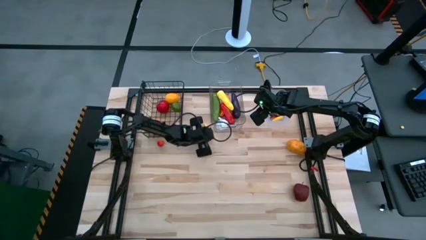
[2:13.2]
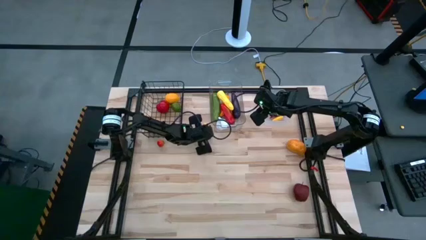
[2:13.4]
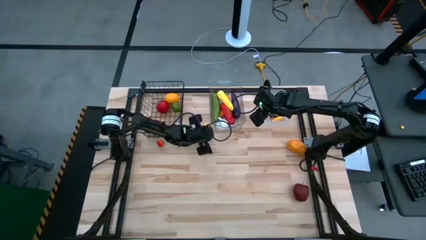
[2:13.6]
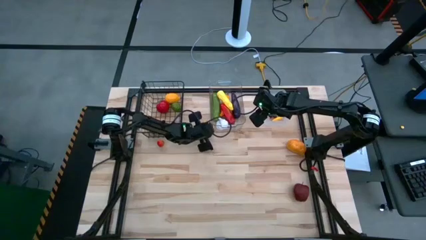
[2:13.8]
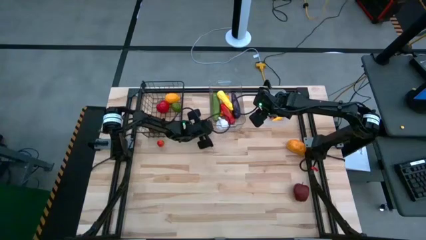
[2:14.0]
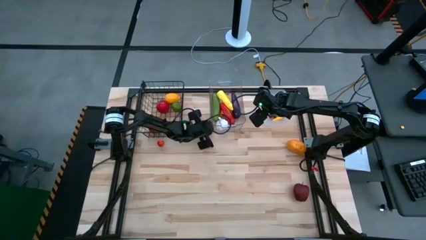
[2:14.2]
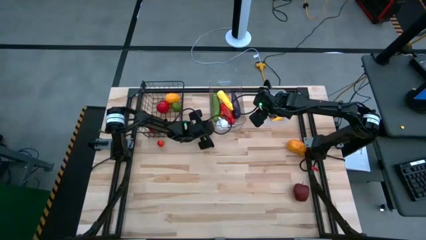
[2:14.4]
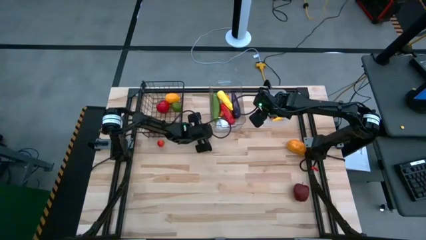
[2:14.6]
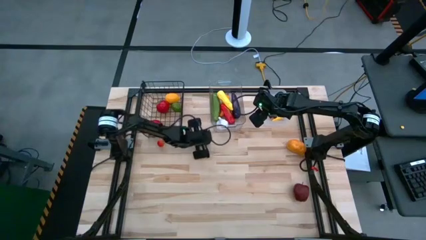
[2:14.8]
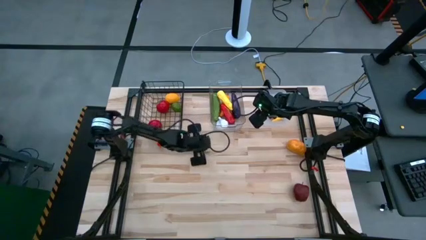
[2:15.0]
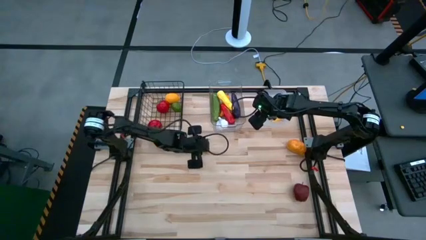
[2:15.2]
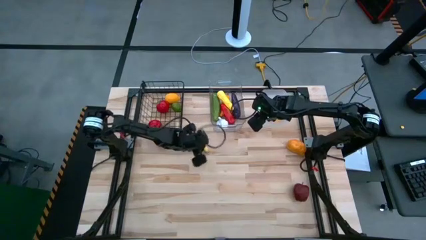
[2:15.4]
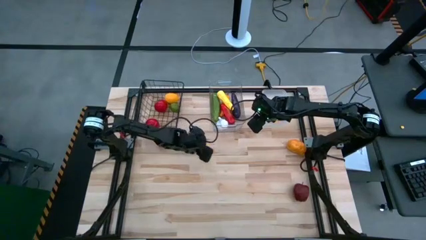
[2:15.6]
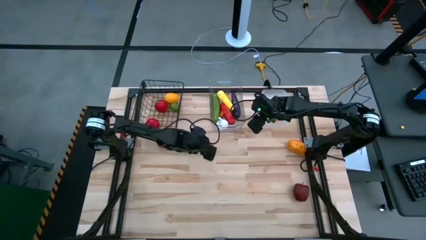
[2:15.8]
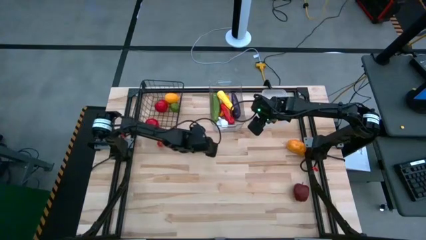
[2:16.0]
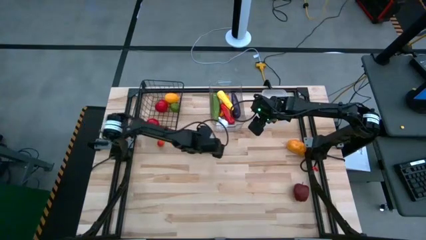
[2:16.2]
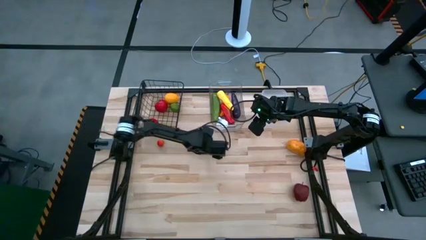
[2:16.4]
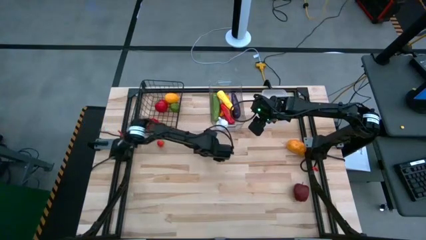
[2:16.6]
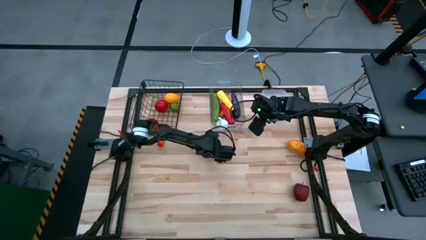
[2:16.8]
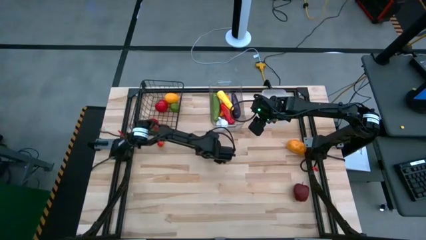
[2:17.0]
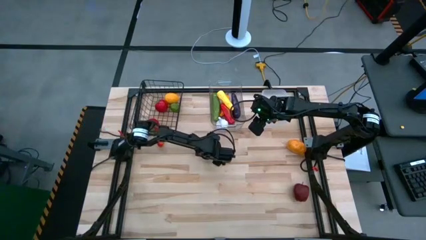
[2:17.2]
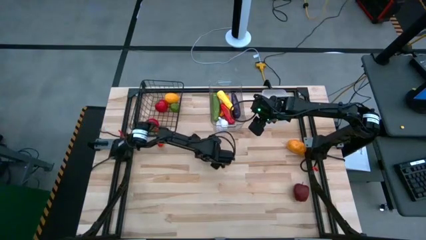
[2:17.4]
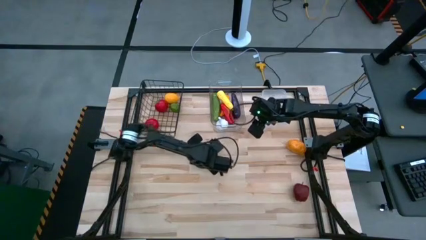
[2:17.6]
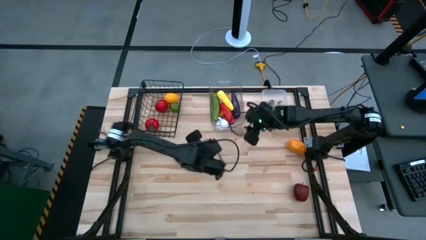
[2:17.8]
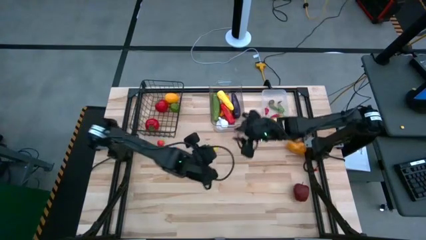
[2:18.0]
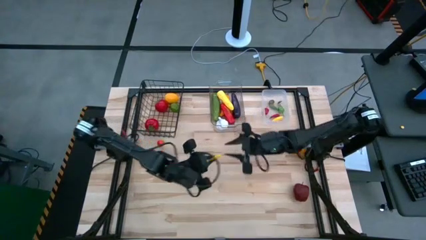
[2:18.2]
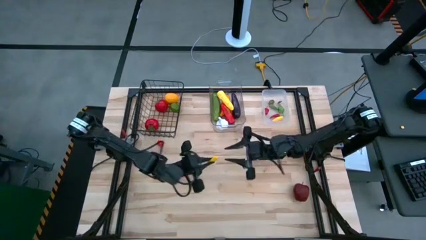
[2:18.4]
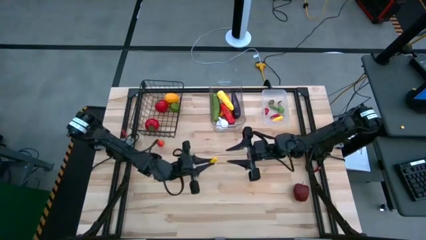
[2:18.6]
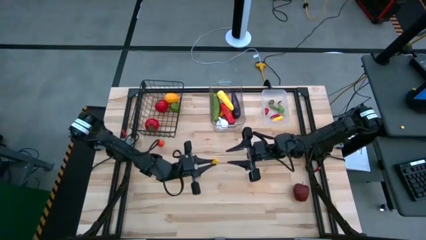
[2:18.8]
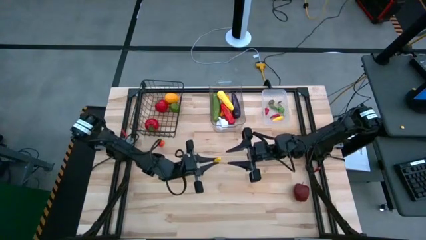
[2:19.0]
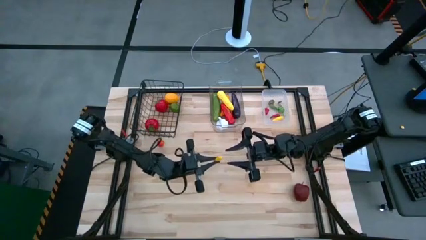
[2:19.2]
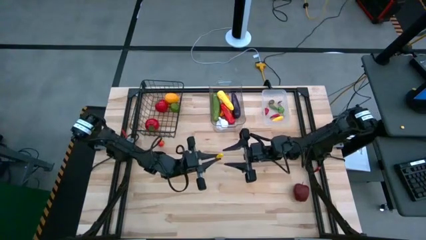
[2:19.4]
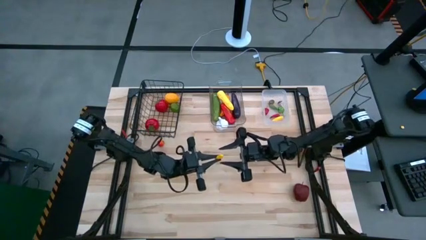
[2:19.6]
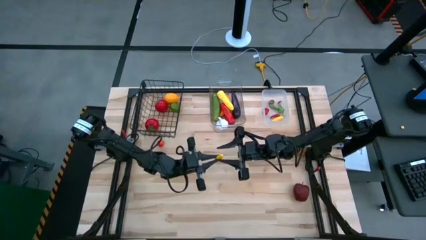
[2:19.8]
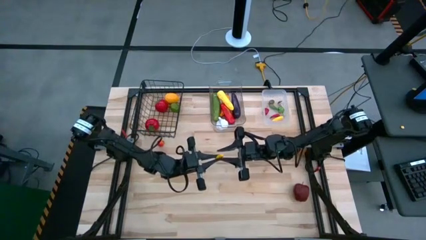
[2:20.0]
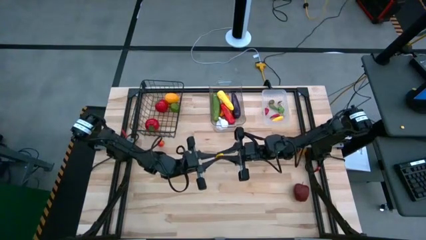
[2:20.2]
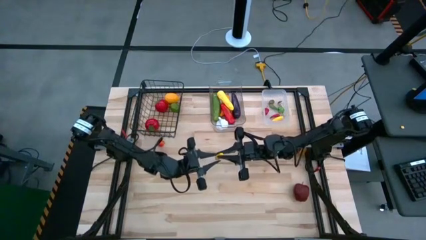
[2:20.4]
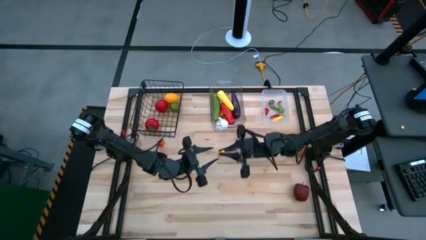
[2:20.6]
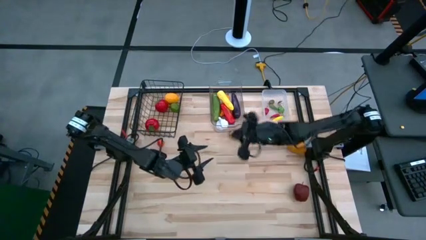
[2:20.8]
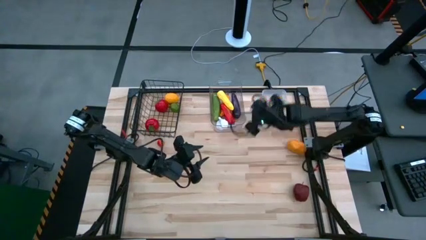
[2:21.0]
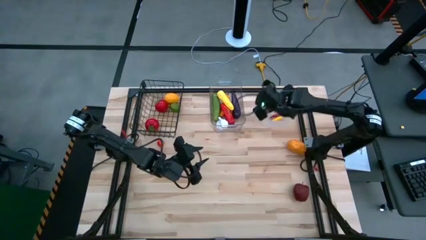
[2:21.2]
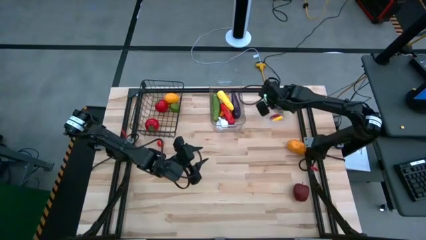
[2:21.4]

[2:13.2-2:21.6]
Task: Sort produce into baskets
Put the yellow corn into the right transparent bin

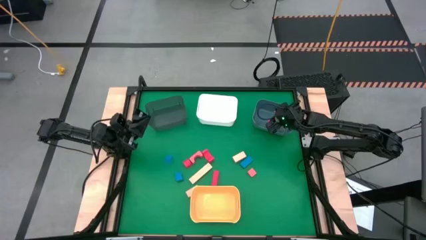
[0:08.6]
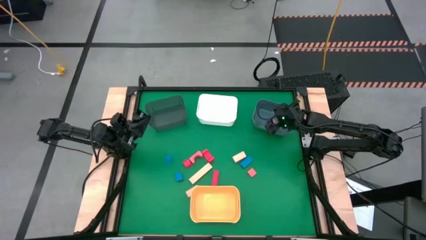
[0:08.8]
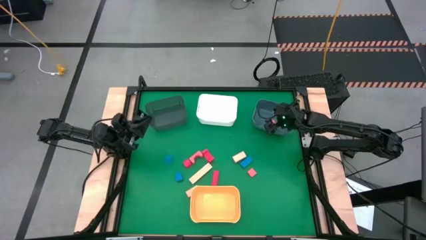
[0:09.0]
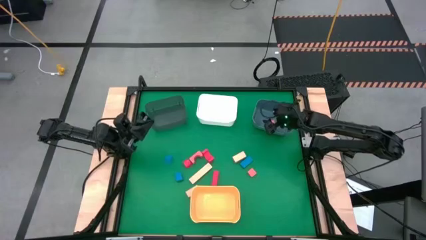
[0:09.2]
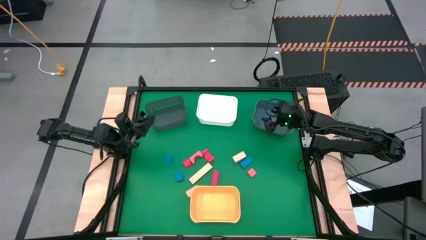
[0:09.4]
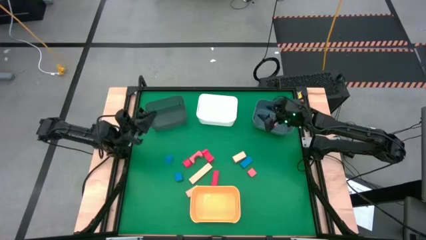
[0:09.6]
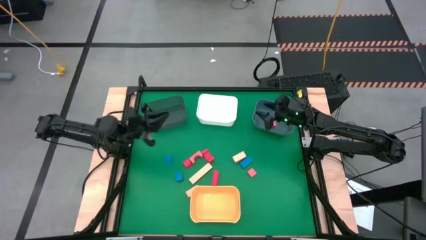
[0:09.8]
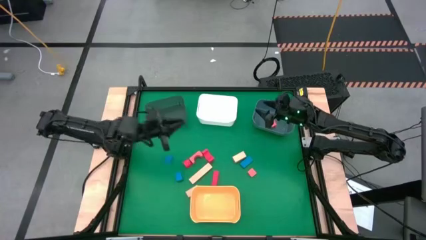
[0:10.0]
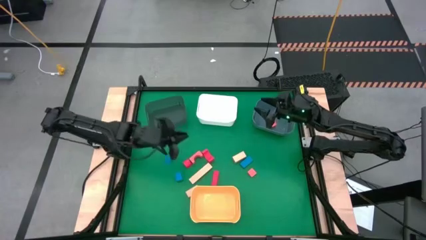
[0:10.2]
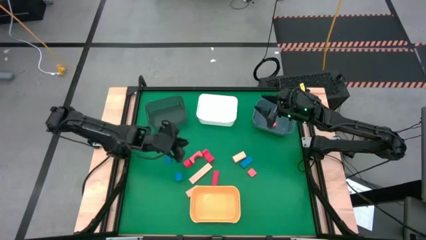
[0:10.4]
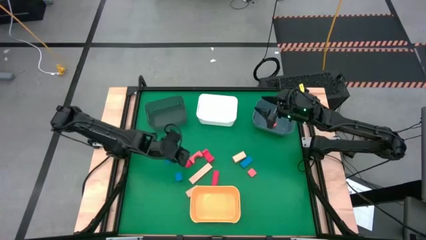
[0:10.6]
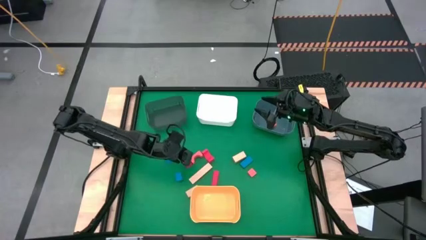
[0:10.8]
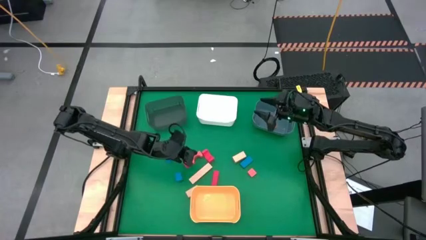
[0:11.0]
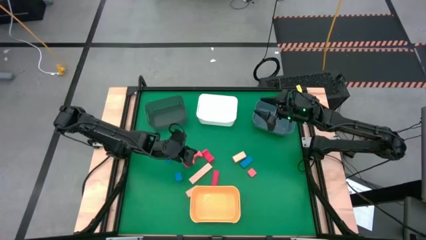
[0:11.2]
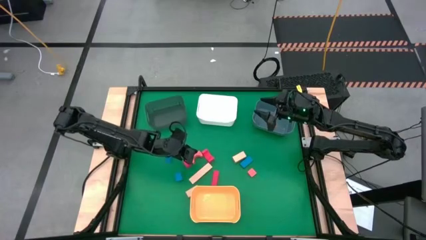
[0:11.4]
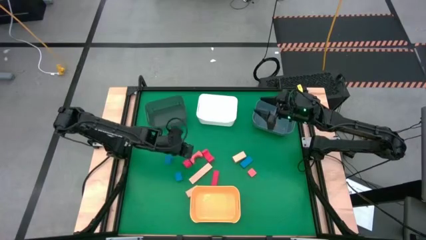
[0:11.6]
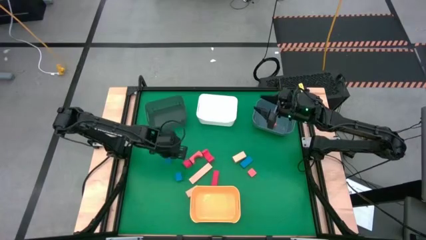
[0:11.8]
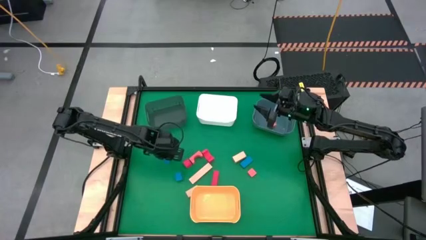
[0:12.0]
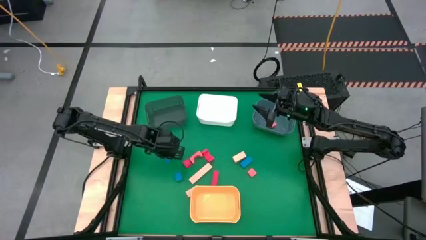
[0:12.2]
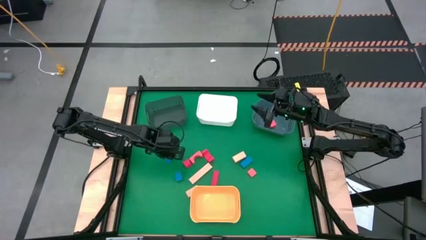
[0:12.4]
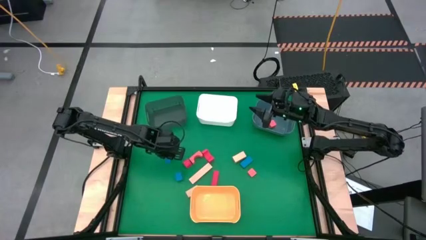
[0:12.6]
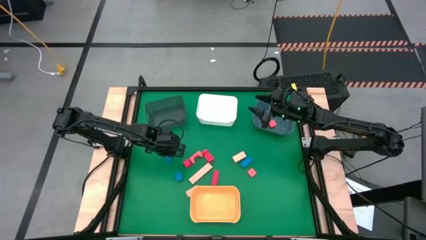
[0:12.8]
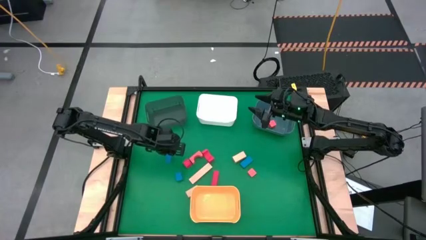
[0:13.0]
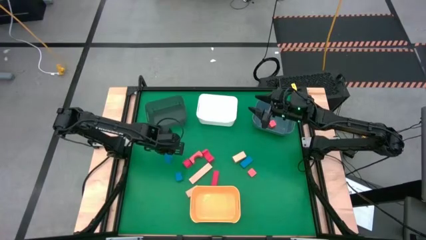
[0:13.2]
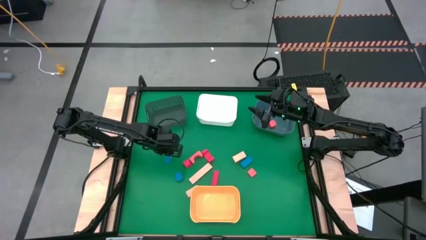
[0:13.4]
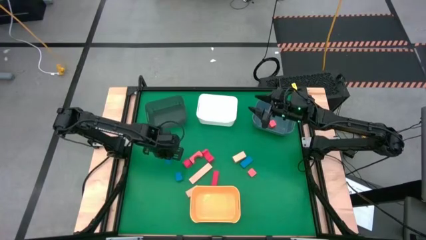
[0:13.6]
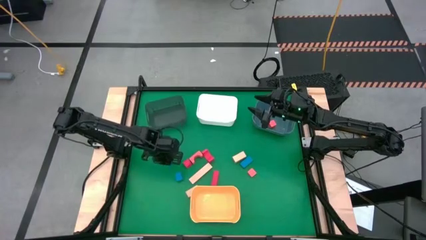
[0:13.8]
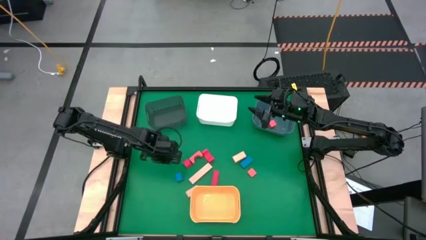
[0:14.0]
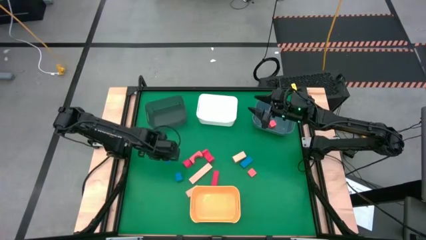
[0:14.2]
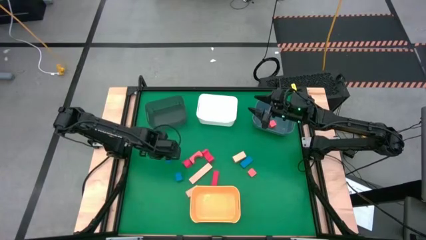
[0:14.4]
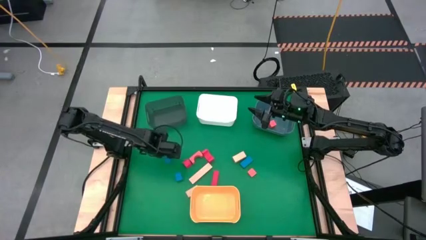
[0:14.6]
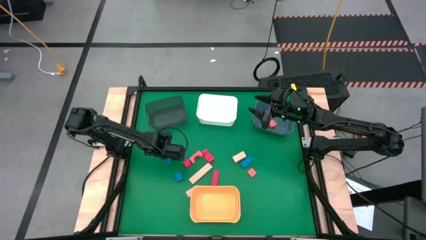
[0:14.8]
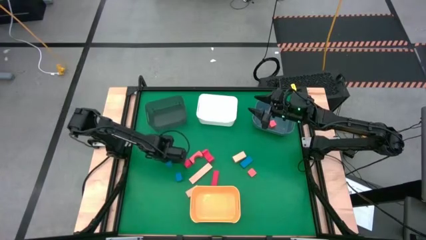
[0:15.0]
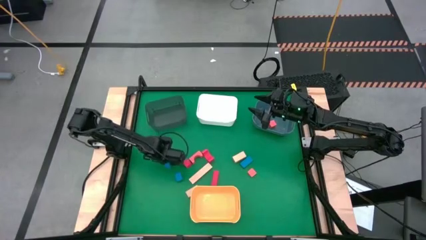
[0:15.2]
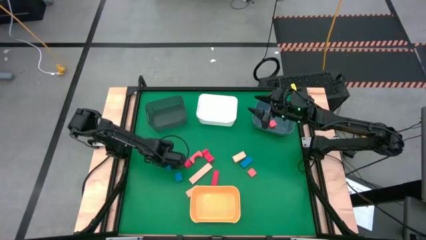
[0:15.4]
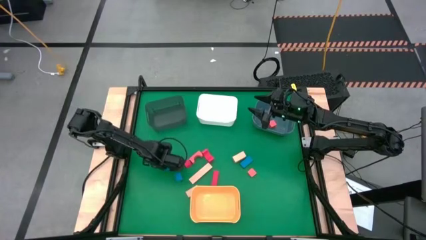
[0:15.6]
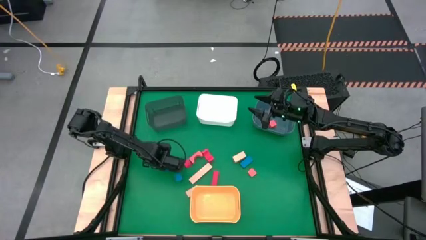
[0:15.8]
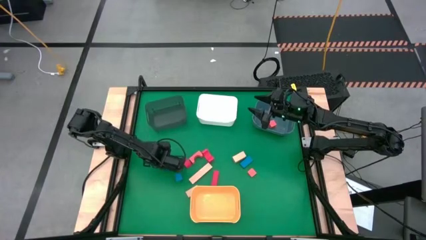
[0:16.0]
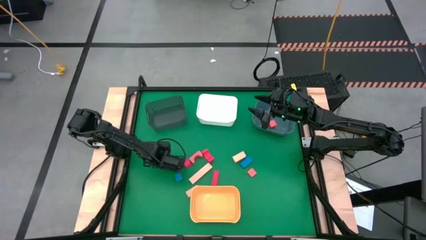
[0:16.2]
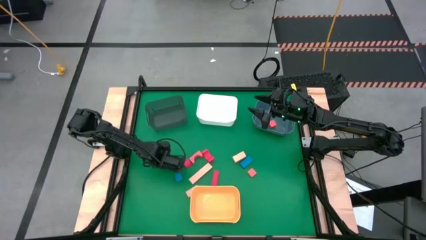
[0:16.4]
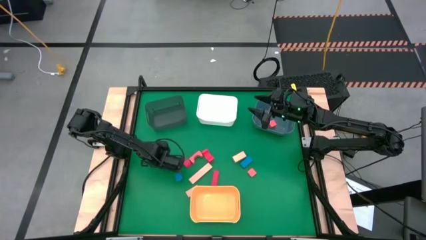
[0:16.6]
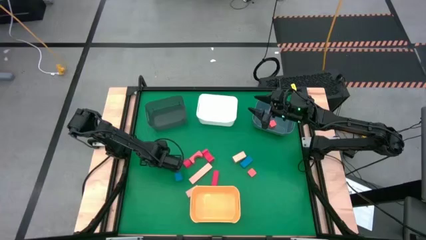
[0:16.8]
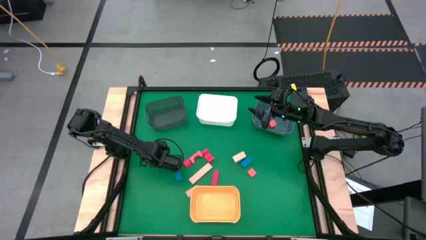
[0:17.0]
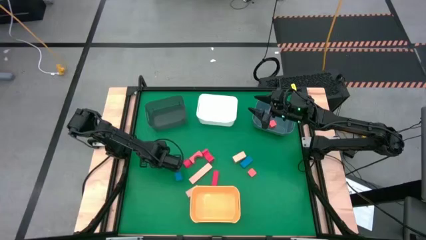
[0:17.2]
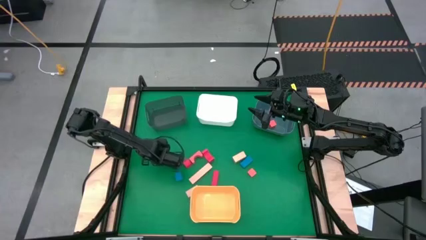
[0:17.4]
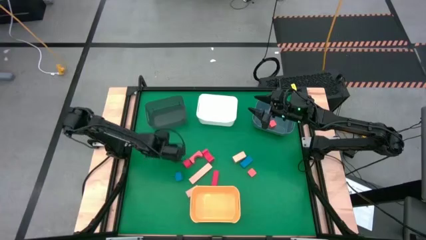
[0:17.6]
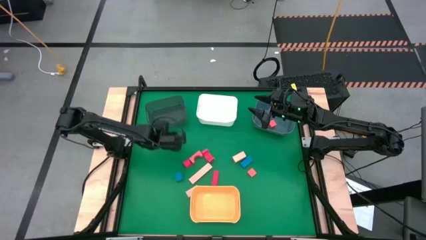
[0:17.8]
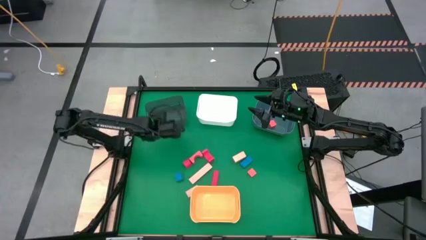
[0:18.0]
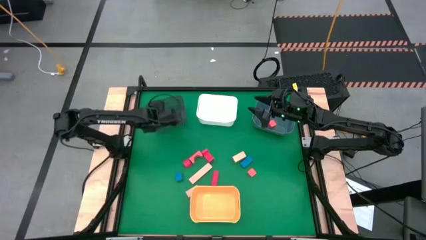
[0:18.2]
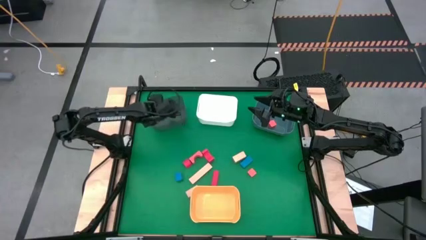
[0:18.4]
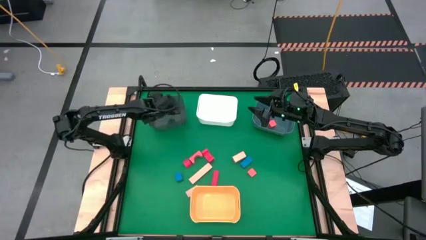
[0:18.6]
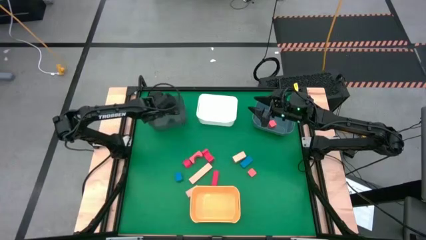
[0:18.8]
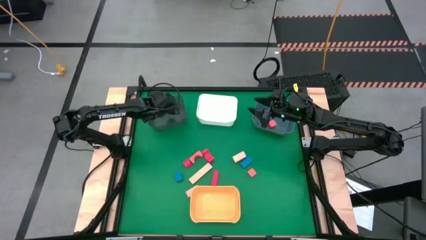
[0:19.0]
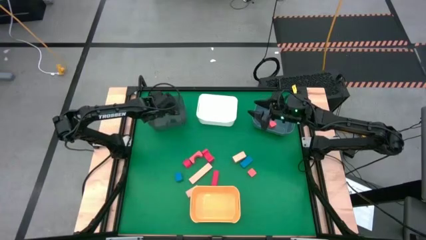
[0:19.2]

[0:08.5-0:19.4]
Task: Sort & place blocks by color
Put the blue block into the black bin
